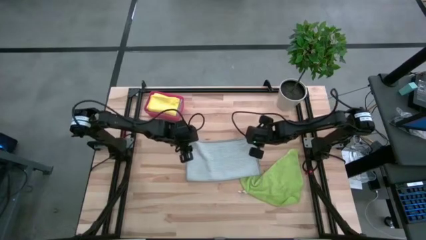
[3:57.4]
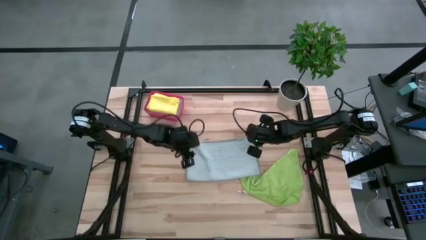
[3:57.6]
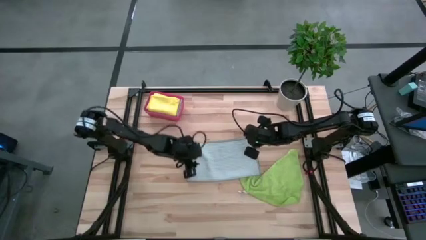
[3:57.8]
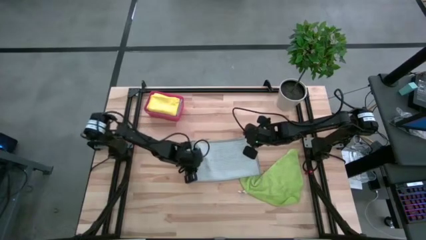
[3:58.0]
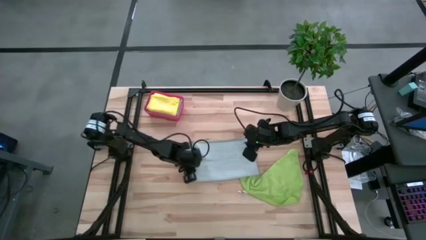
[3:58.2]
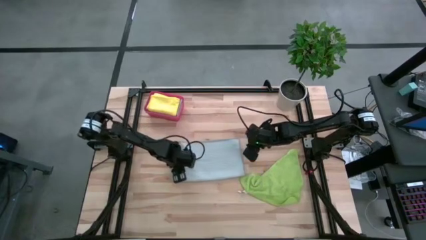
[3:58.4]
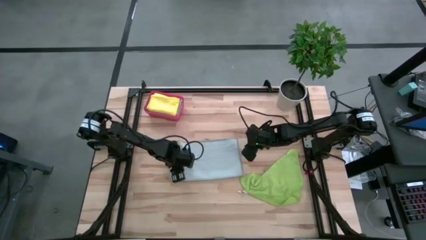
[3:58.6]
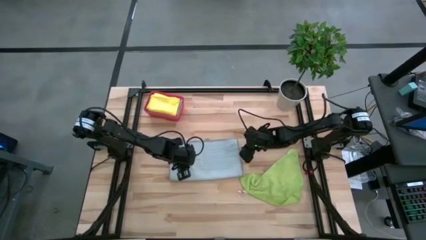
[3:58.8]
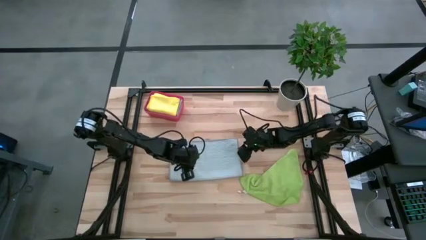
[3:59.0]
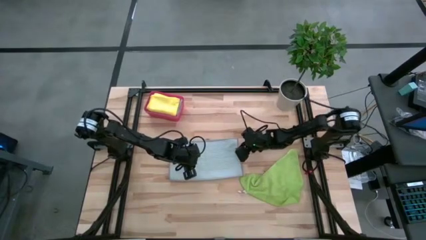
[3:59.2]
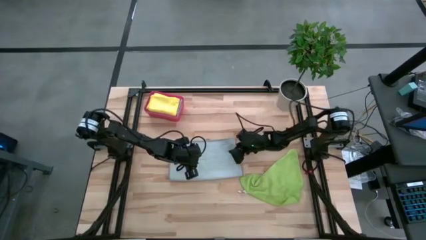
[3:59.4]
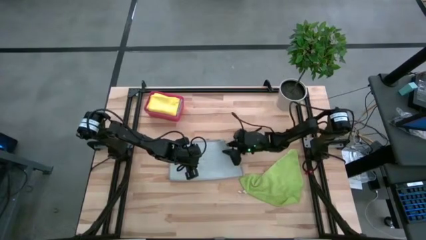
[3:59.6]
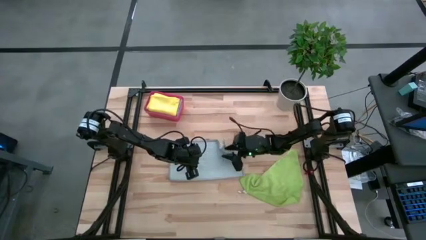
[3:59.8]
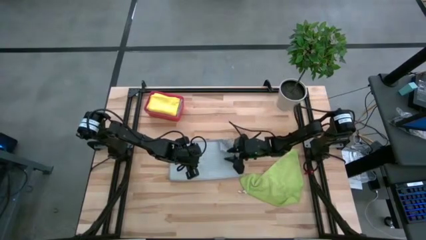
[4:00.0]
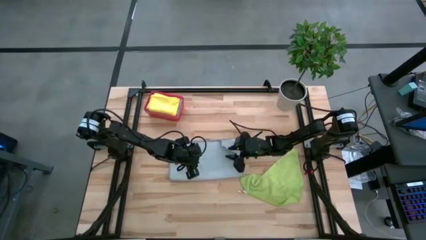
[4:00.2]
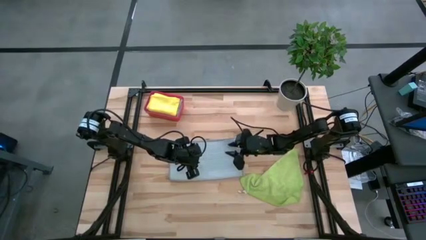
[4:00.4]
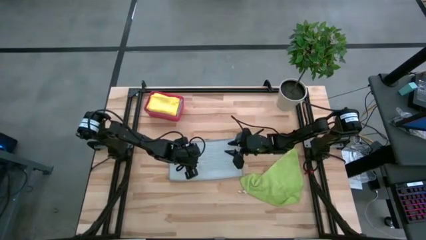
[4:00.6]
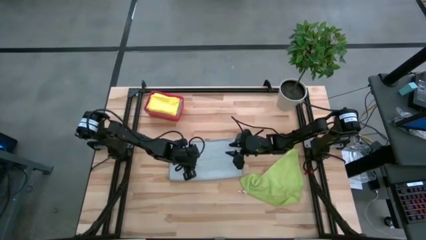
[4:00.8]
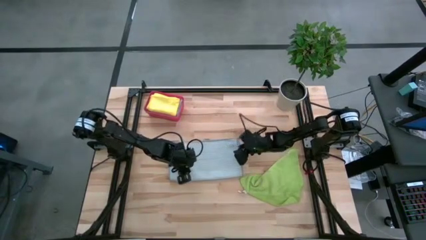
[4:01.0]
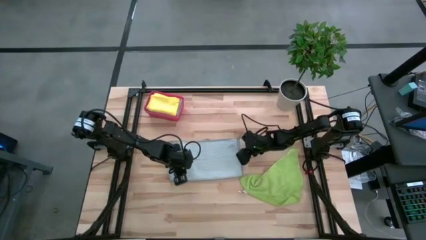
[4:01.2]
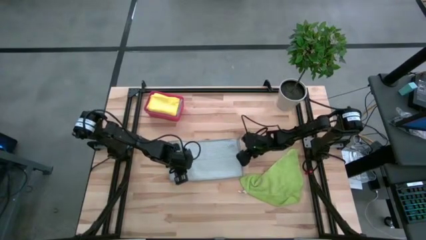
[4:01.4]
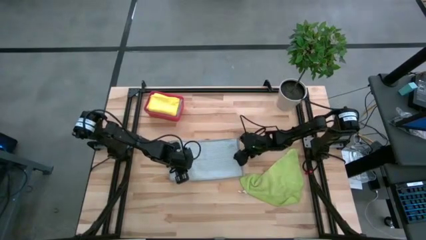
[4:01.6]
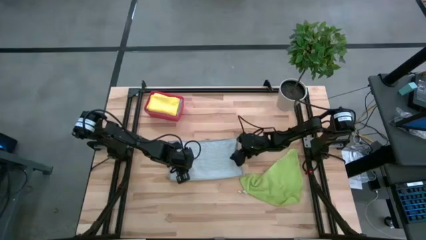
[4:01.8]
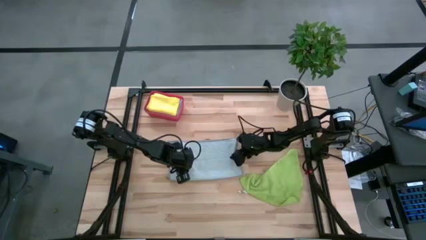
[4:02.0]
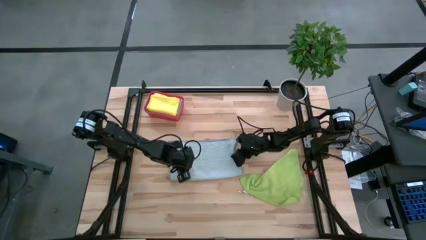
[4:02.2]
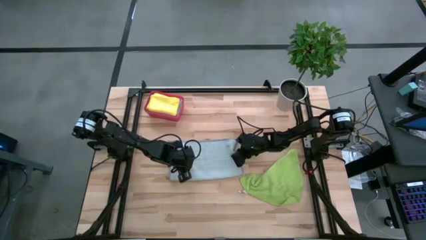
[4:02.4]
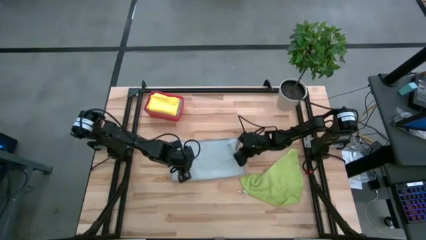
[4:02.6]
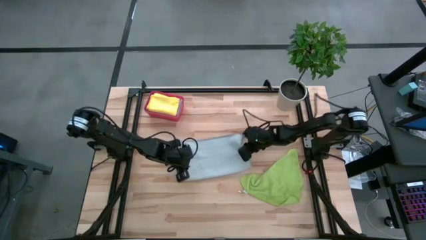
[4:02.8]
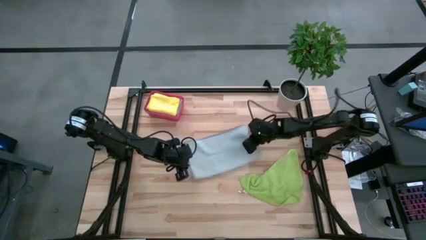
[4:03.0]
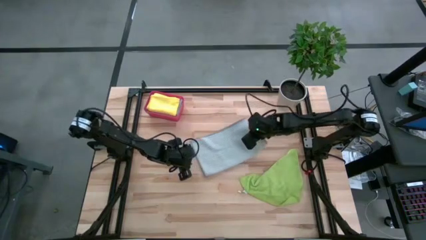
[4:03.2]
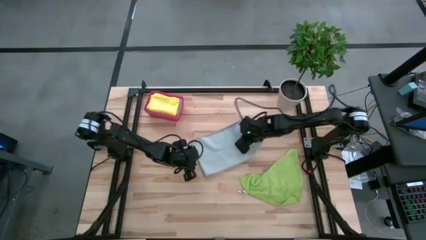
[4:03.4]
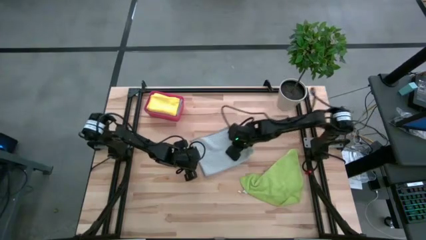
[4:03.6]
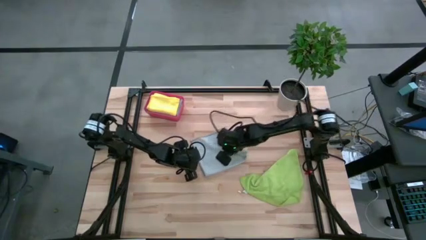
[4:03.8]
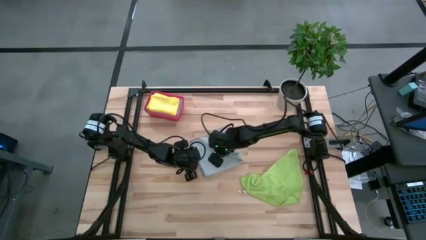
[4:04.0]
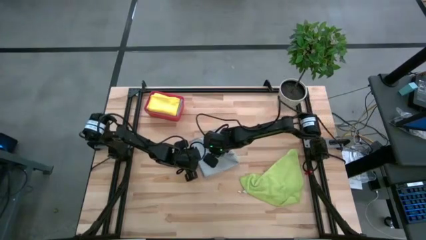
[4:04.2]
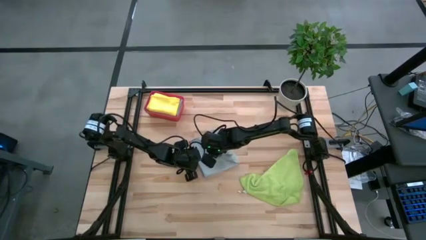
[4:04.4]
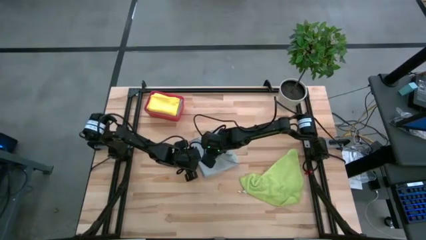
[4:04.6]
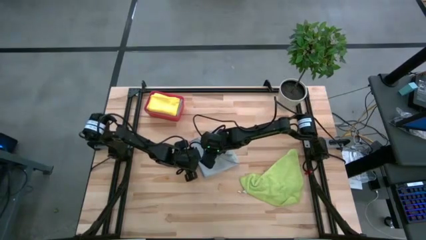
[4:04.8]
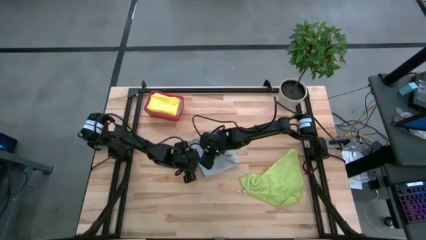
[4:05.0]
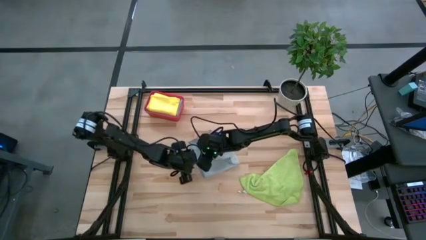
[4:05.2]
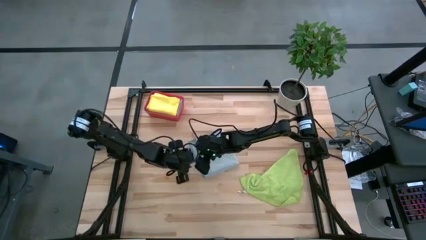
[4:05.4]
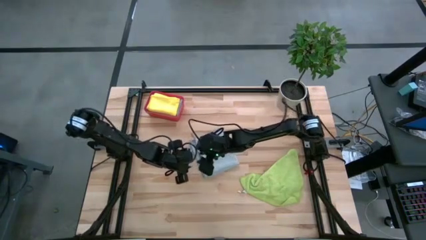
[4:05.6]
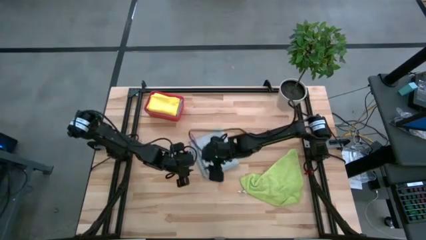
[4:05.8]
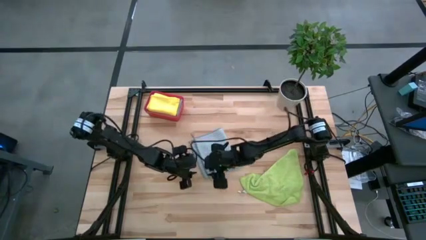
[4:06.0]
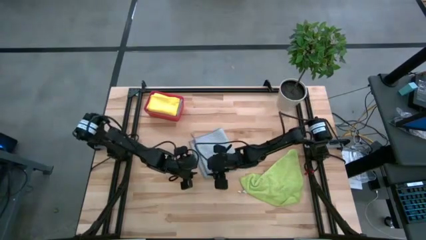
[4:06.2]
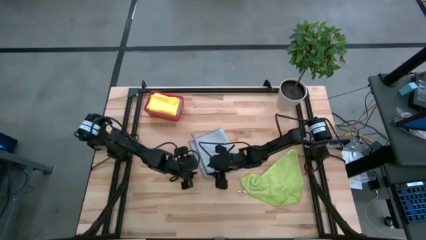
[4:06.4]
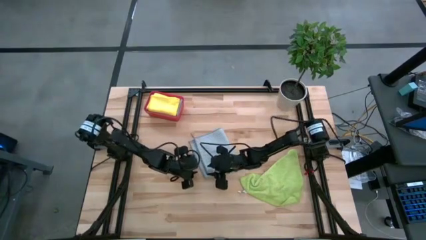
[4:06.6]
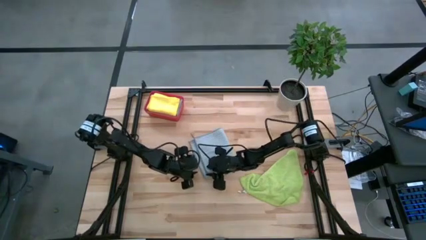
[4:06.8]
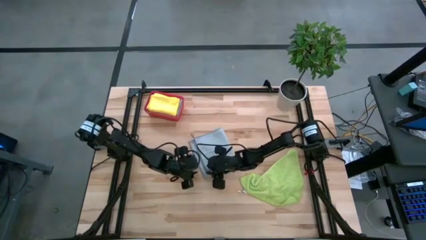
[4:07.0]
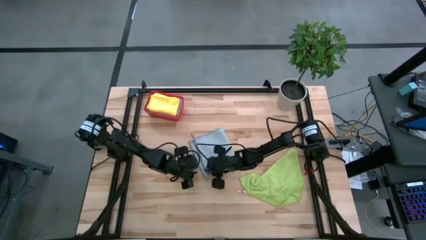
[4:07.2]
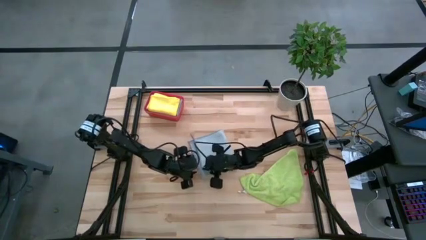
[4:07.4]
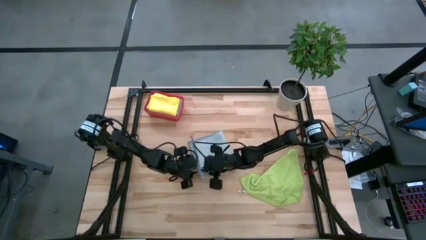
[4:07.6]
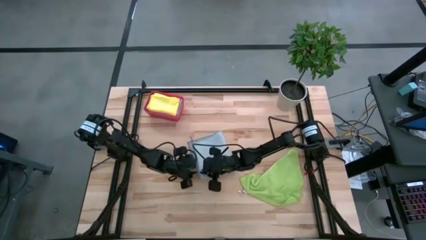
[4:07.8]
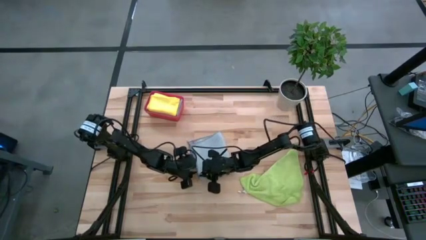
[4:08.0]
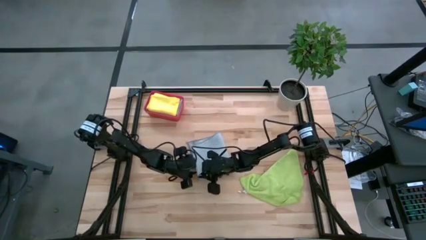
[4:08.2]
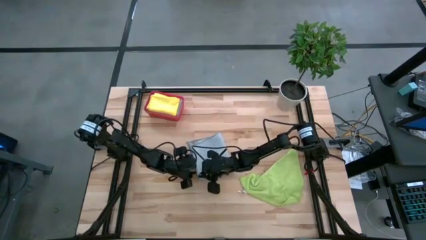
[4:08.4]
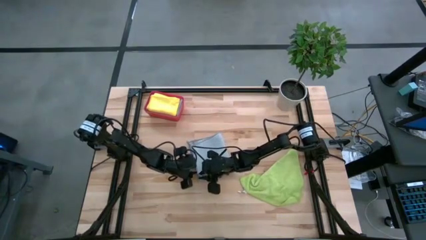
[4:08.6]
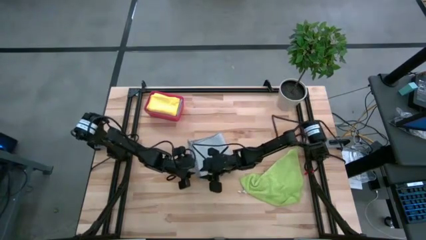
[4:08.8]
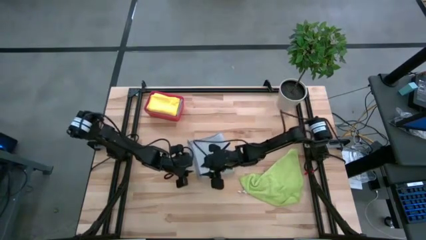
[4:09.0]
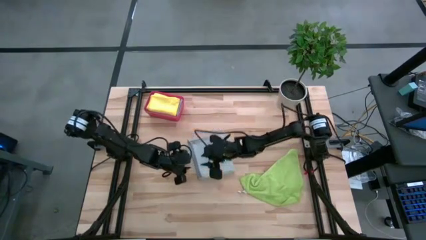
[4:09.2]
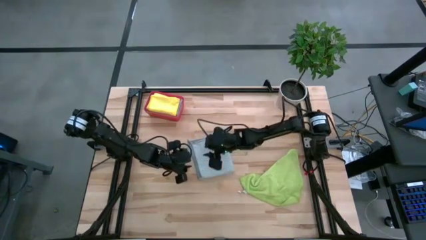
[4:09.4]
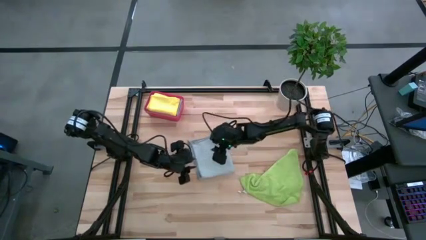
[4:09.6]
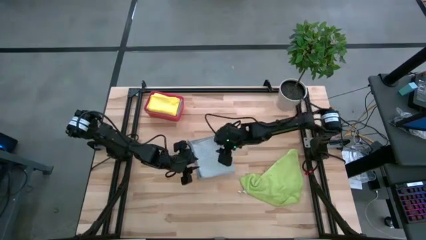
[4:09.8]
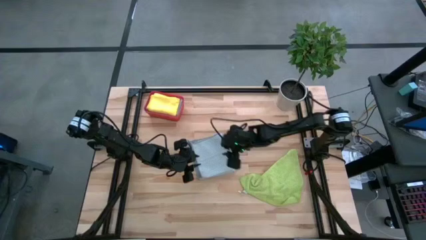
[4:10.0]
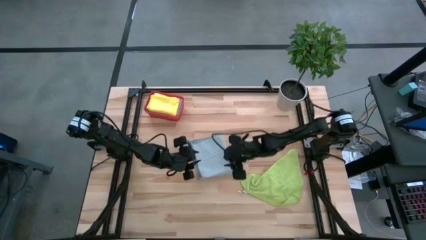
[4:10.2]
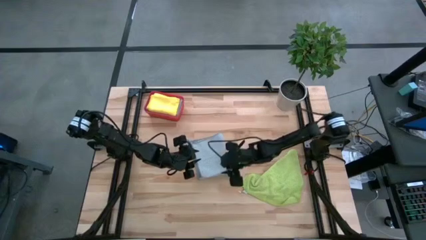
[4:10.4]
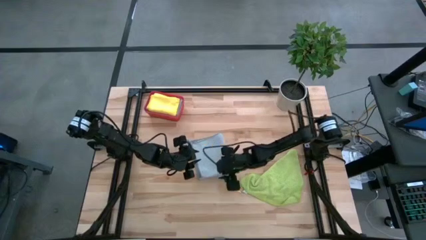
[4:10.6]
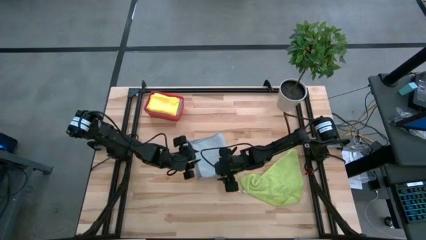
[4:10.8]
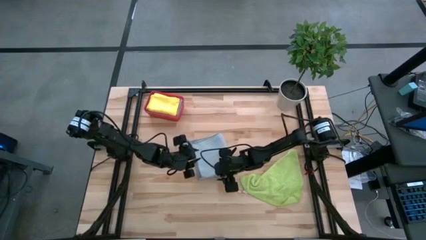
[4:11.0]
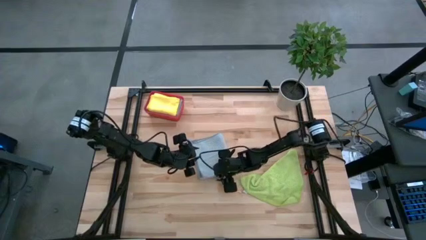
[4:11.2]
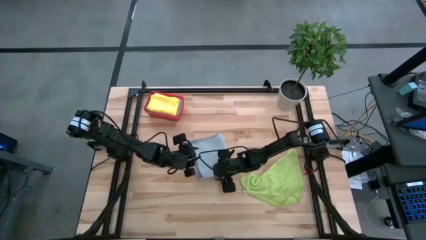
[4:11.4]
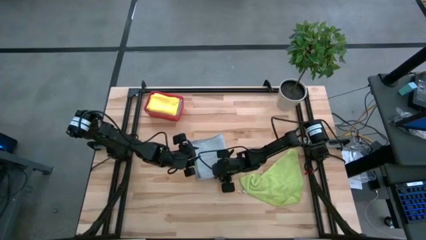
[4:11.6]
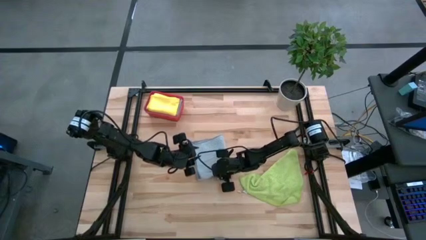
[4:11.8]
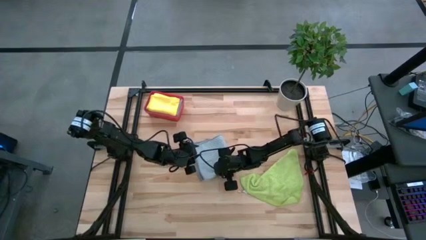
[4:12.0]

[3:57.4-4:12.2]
Task: Fold microfiber towels
Fold the gray microfiber cloth
